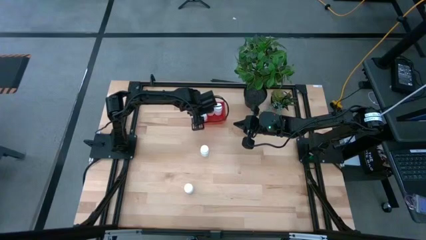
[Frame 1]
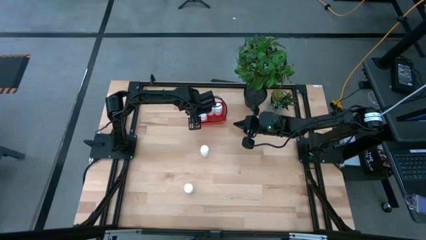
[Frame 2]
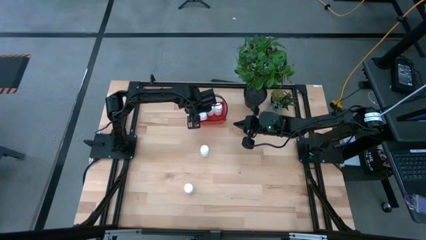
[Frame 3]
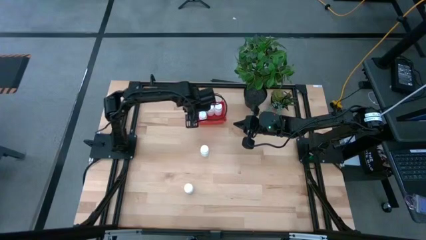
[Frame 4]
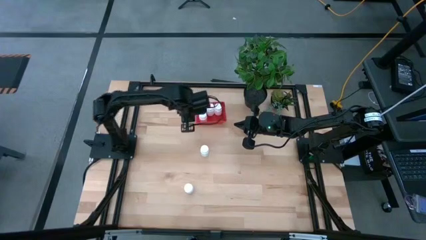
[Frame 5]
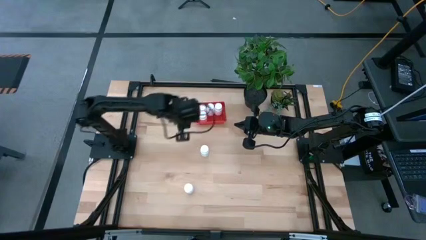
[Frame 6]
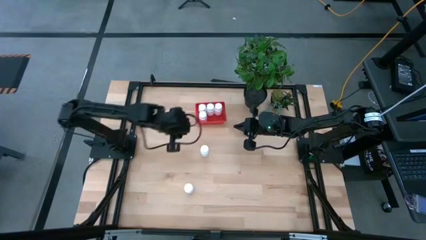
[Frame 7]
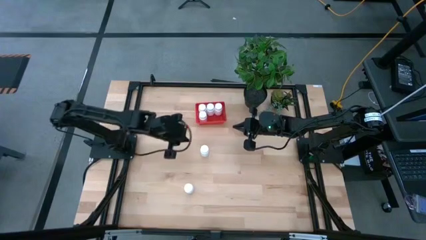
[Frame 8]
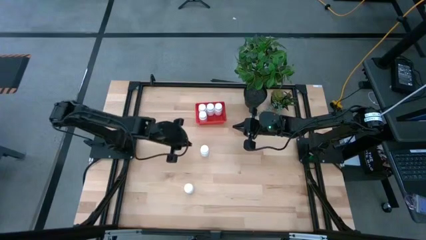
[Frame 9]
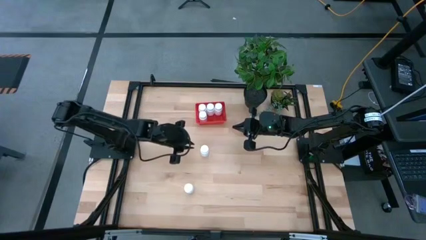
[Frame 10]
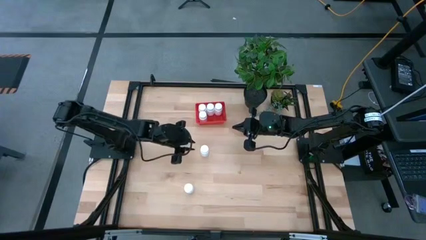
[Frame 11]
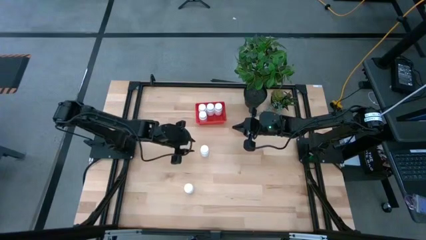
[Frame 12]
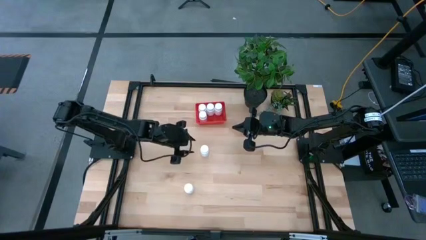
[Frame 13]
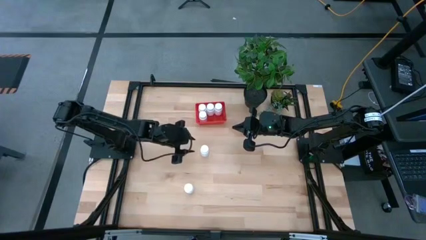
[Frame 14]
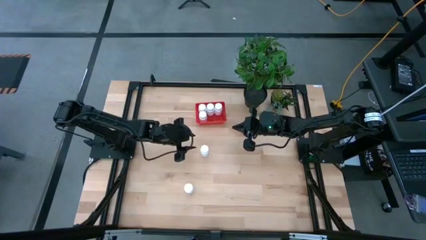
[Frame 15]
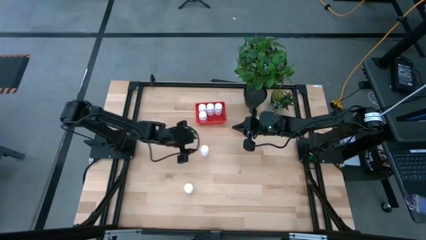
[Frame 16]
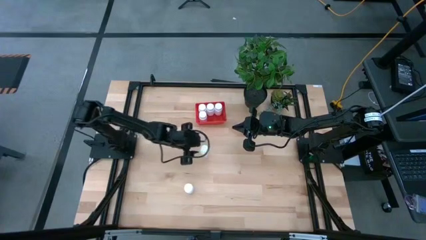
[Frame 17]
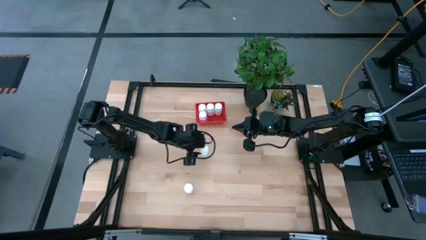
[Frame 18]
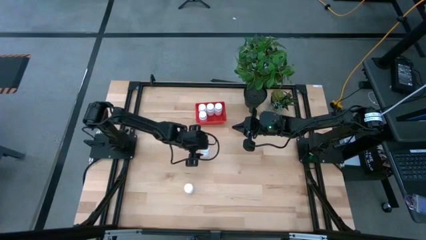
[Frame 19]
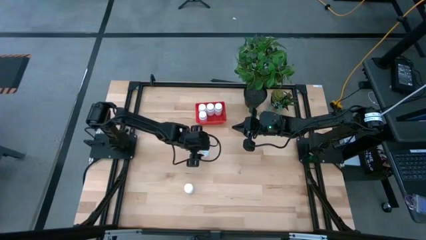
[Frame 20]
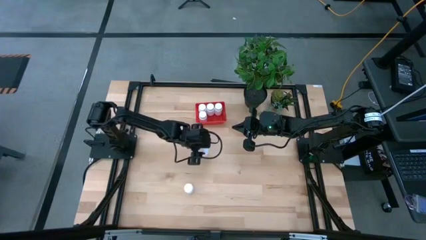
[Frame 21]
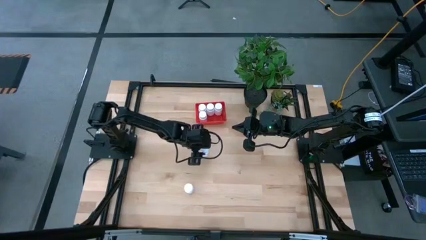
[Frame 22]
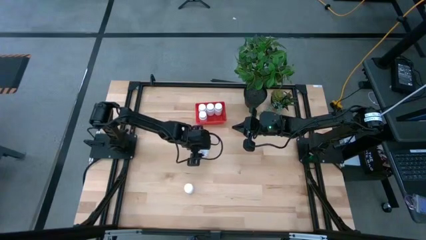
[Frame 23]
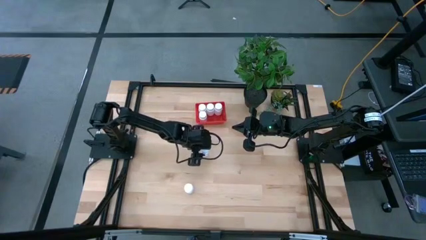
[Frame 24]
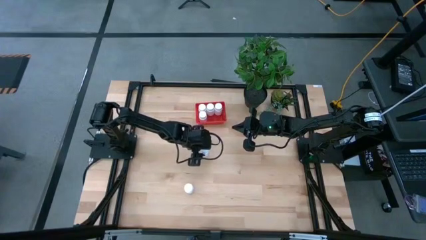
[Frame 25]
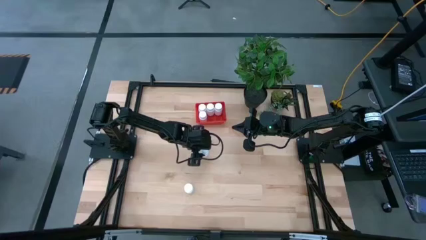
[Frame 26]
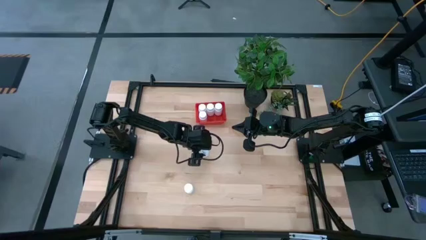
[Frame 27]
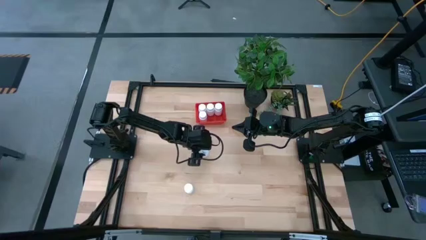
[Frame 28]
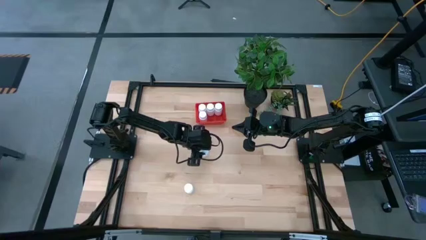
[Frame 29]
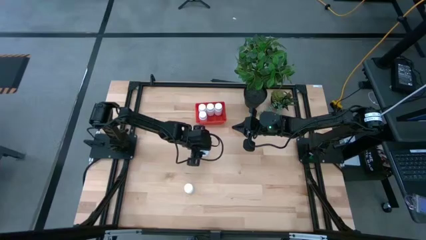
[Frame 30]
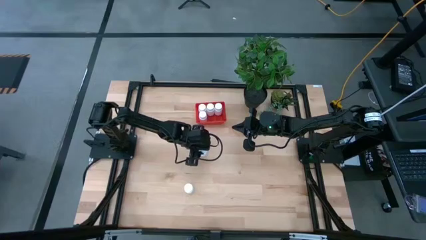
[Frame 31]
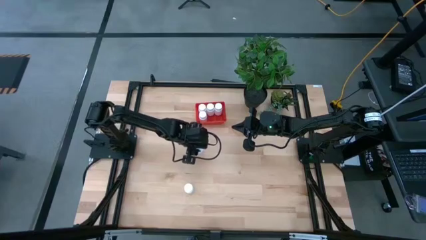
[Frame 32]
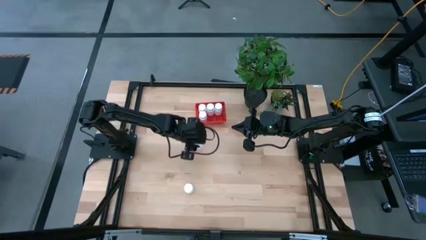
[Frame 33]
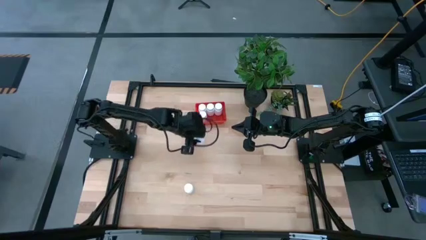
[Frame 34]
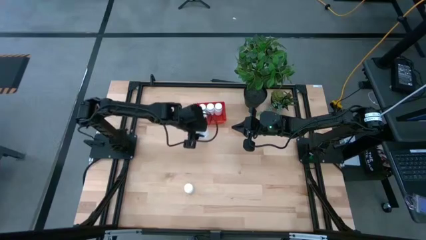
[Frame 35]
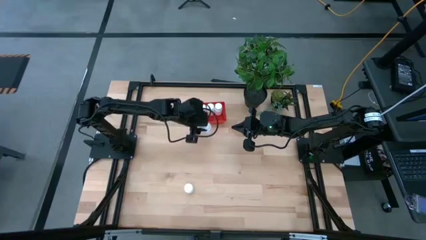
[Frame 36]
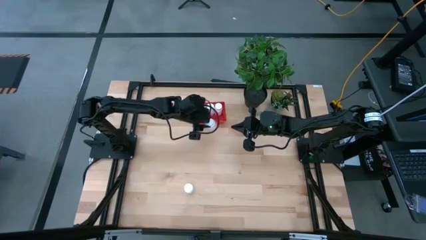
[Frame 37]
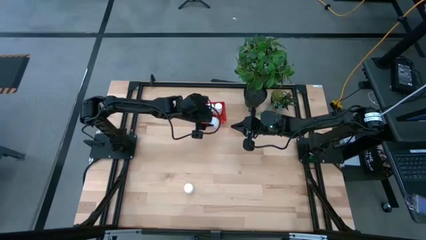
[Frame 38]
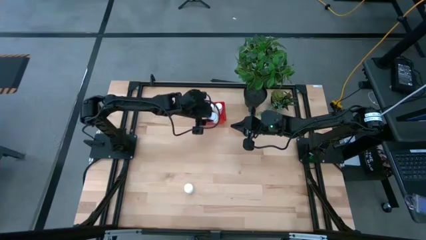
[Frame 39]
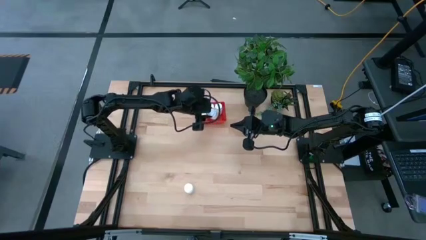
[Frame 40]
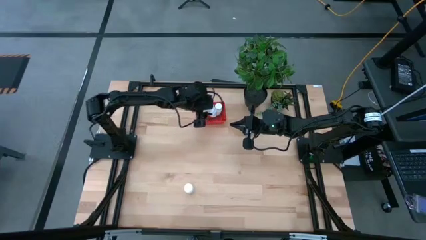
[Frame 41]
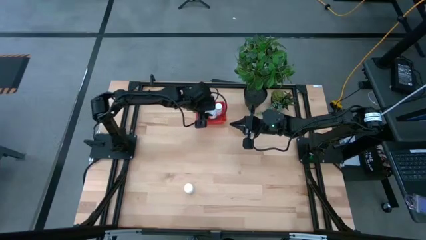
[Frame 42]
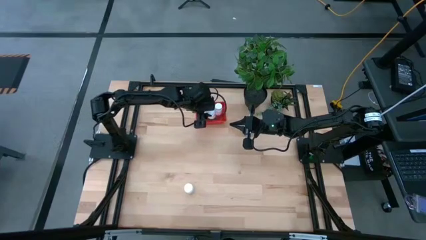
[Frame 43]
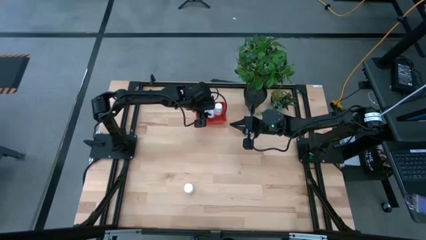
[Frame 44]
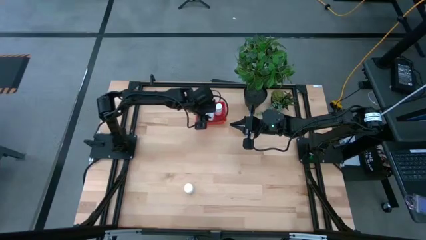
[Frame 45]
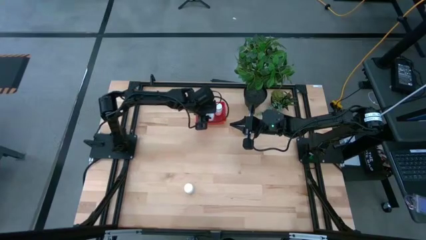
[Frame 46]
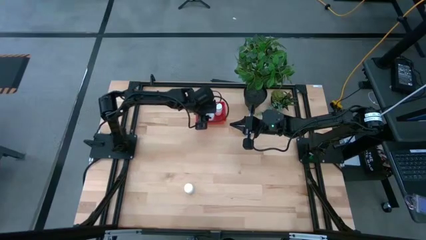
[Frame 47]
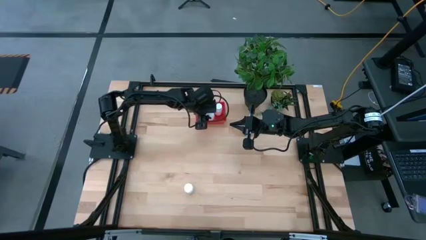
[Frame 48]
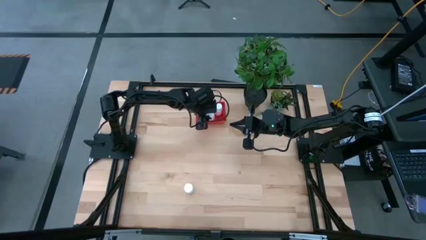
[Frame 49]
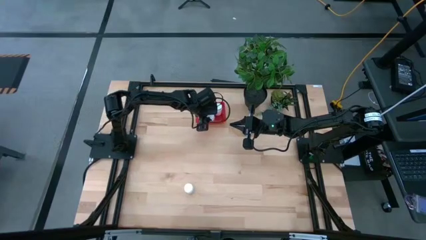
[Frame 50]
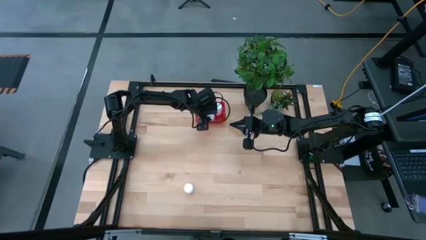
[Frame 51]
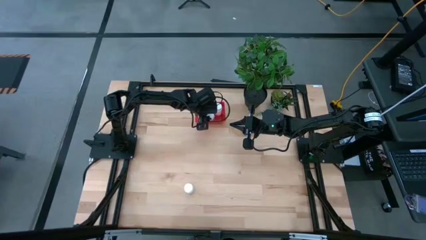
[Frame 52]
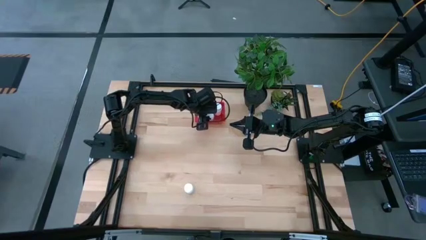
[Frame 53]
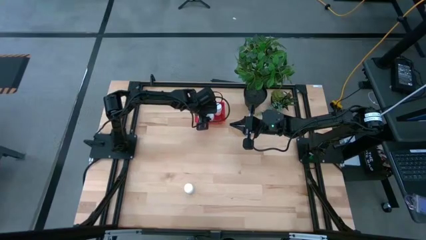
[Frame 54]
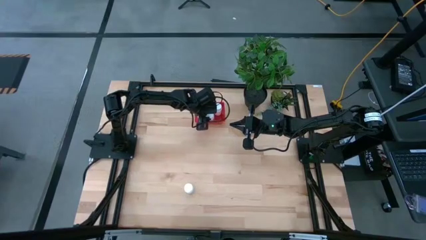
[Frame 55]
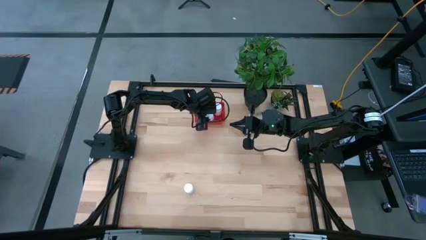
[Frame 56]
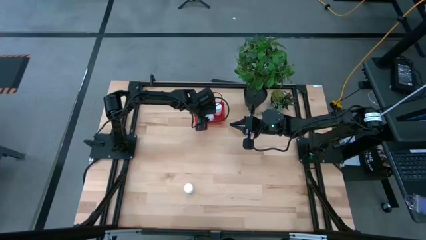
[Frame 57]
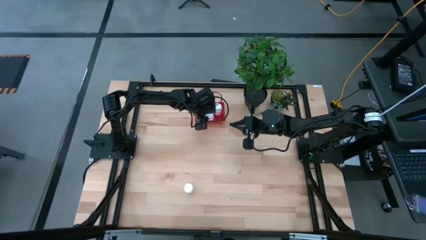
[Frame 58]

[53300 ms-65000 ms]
Task: Pick and place pill bottles into a basket
Put the white pill bottle into the red bin
